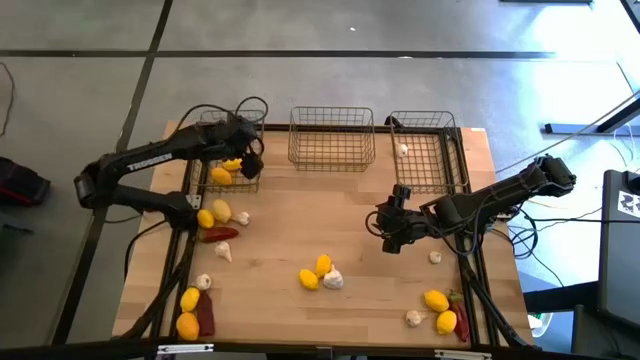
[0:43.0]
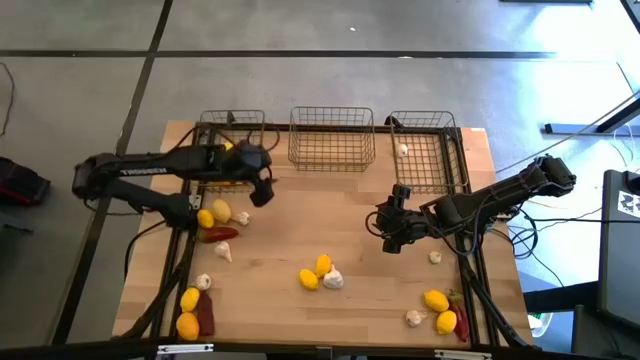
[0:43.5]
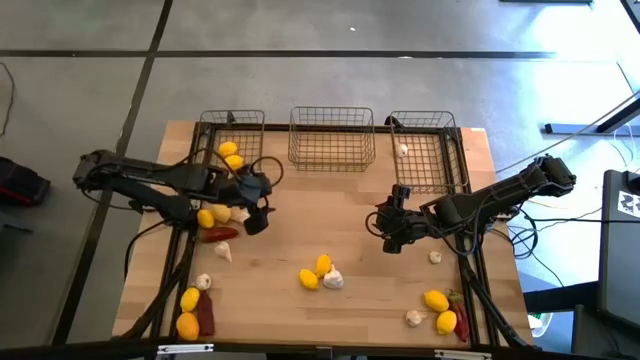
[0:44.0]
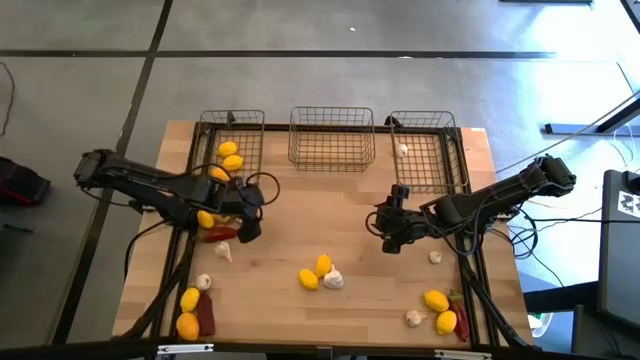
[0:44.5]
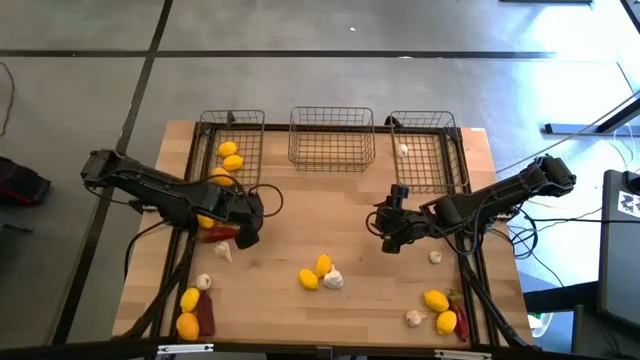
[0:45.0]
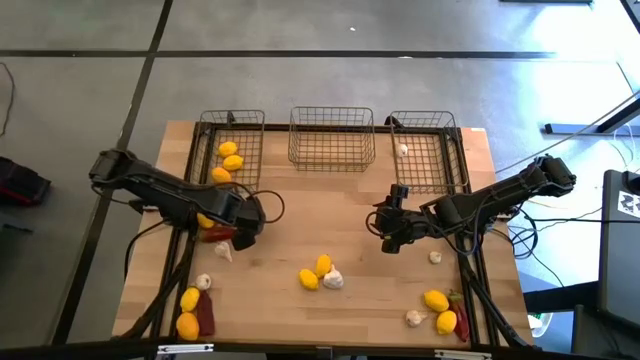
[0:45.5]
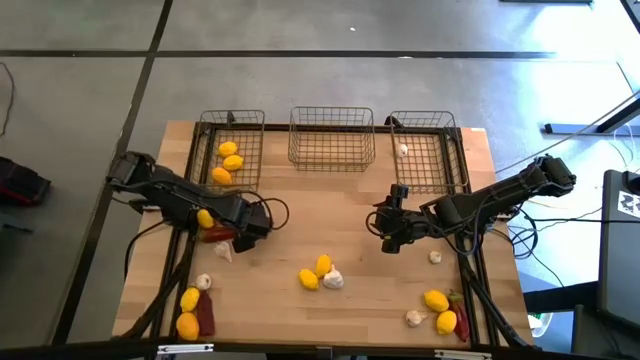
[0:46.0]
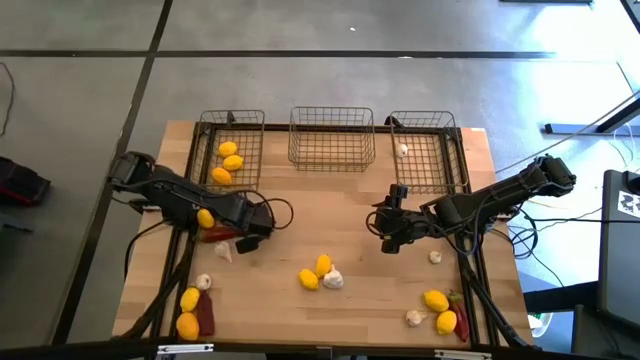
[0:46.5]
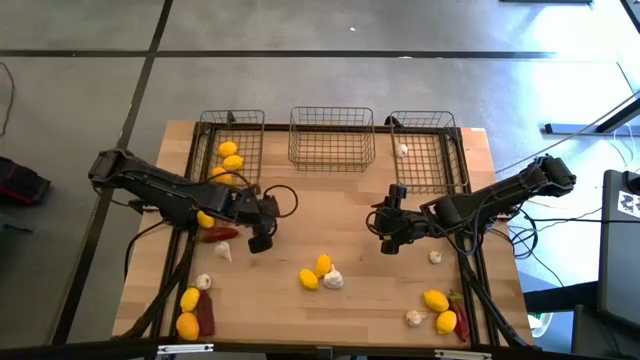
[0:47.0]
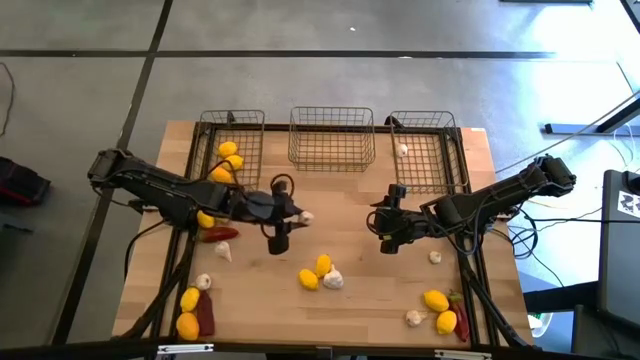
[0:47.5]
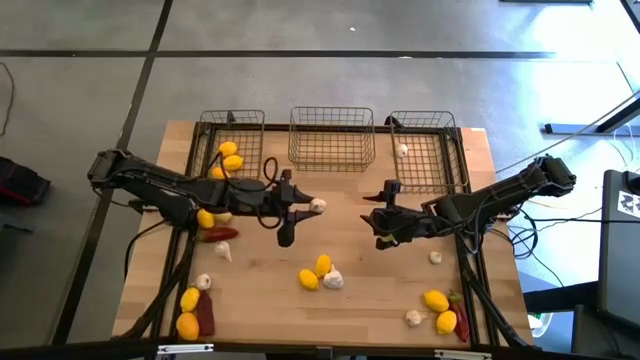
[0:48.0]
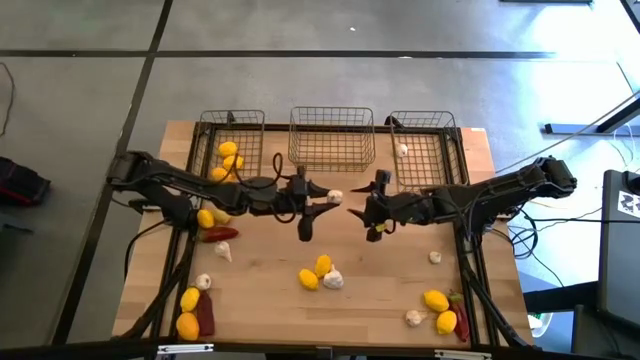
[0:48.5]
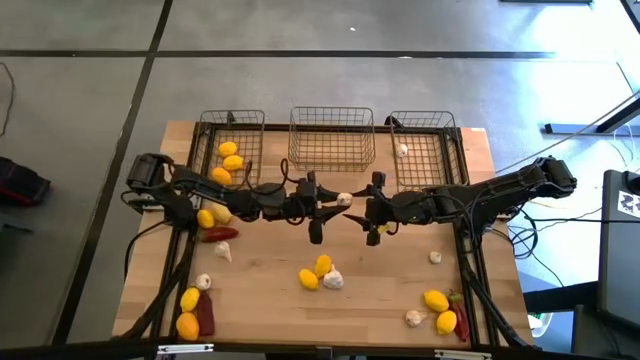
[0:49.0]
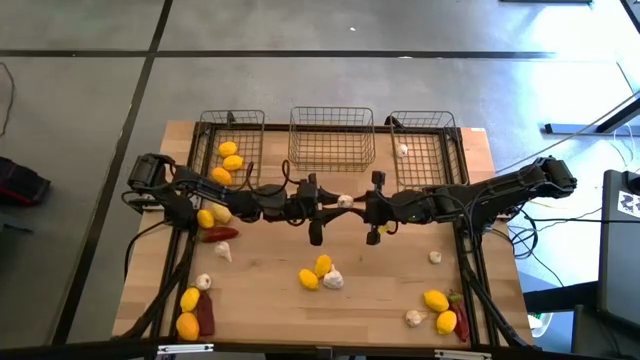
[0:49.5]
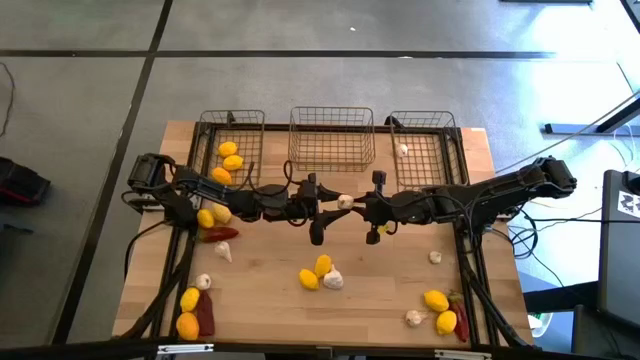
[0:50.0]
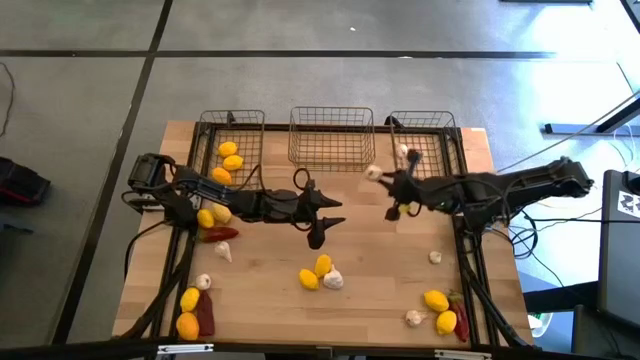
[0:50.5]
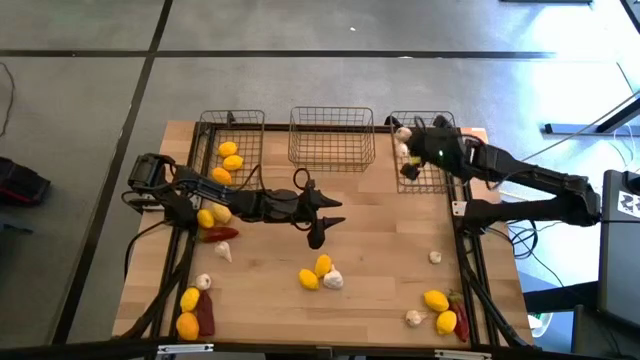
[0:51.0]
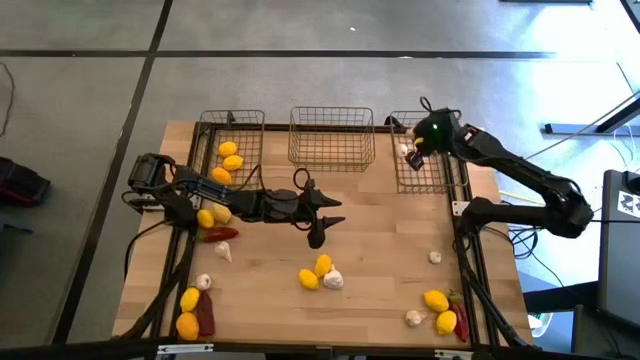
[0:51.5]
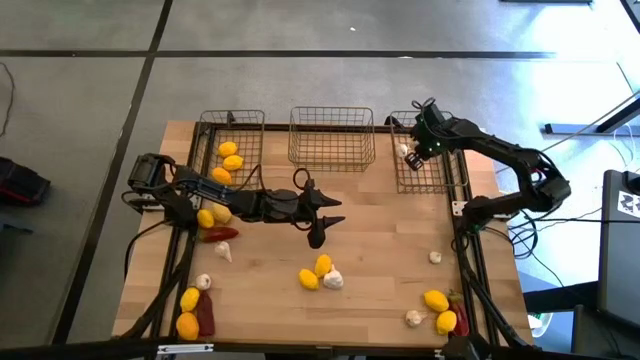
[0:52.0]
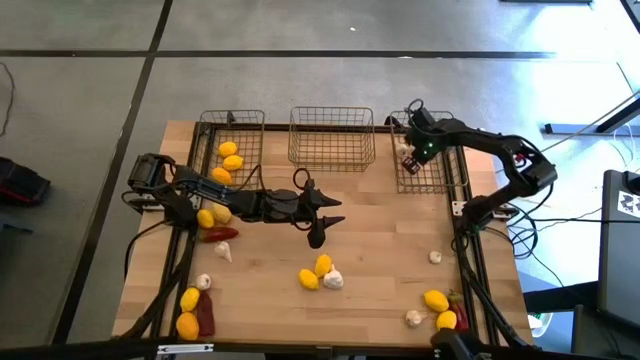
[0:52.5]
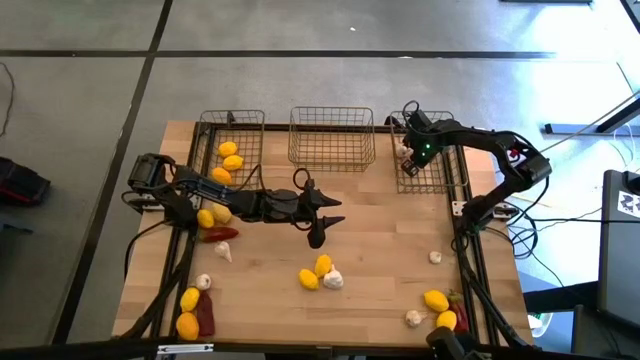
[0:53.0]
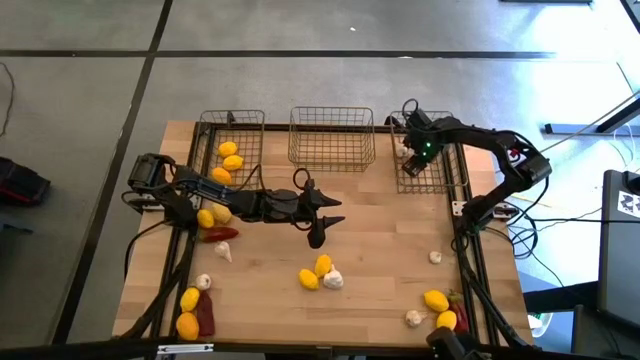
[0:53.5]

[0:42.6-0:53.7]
Task: Sort produce into baskets
Put the white garlic into the right gold wire basket

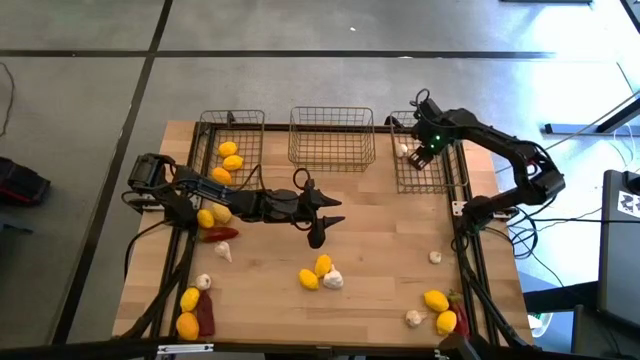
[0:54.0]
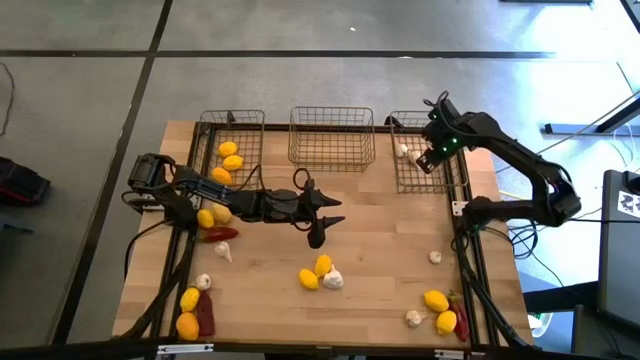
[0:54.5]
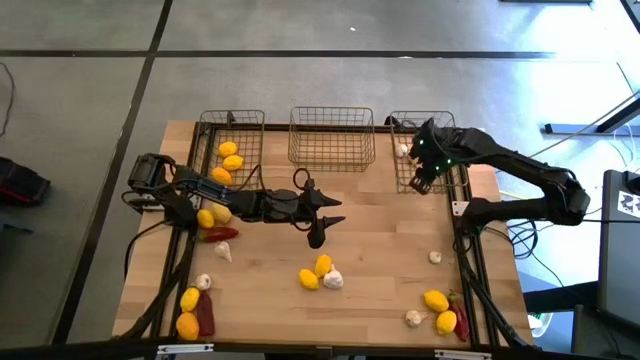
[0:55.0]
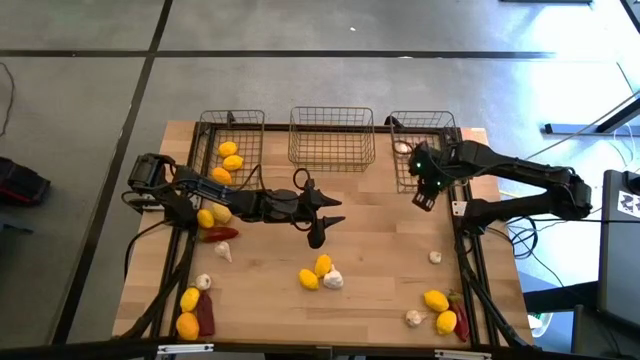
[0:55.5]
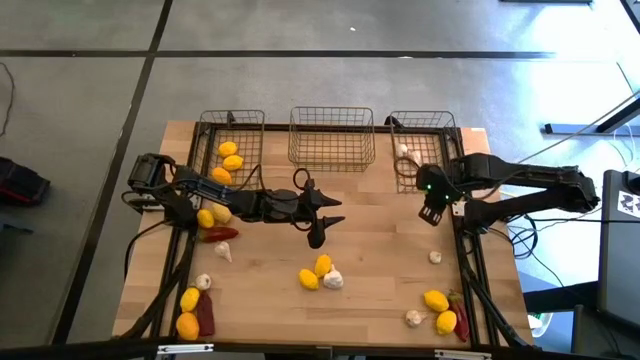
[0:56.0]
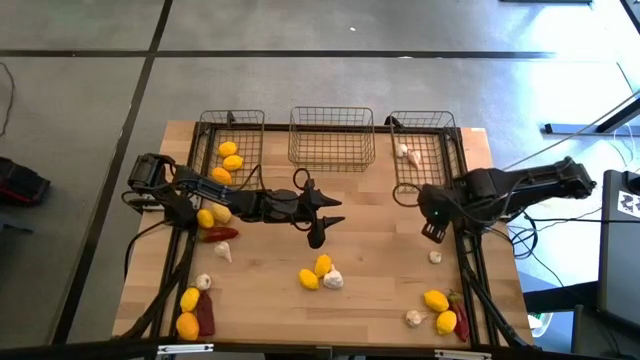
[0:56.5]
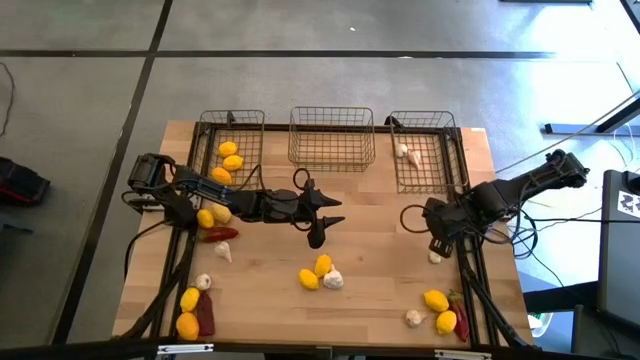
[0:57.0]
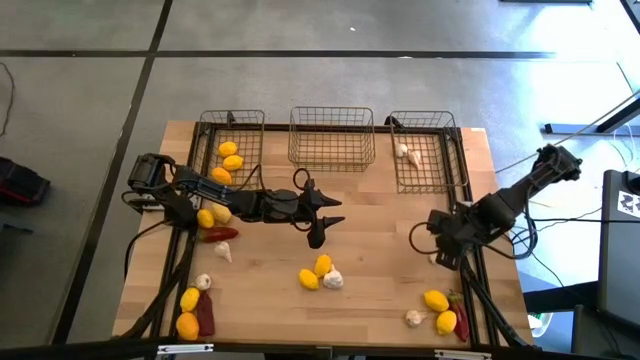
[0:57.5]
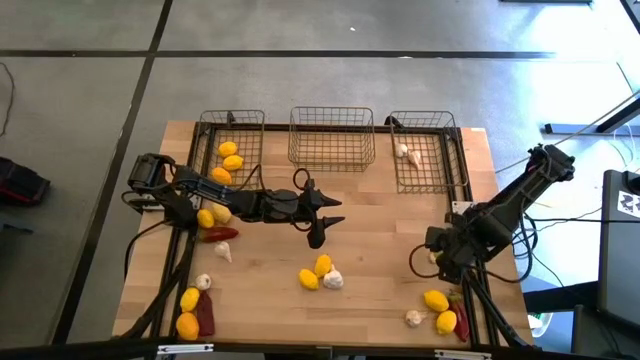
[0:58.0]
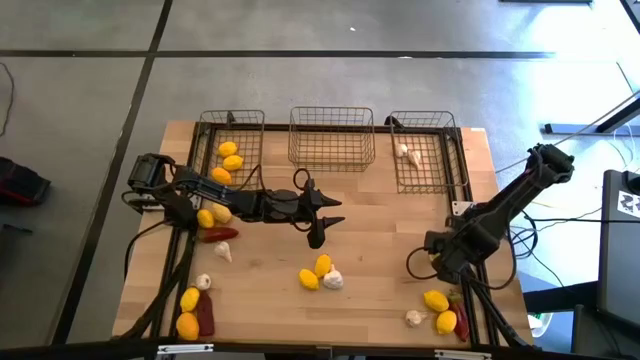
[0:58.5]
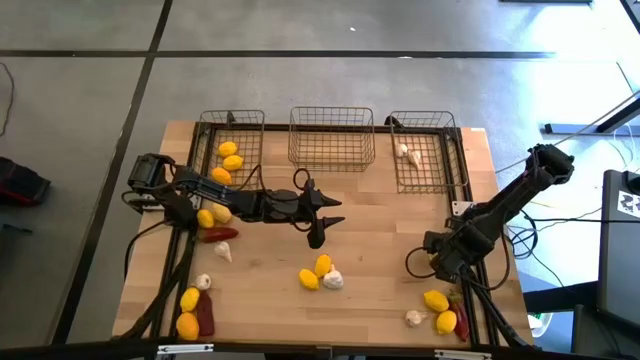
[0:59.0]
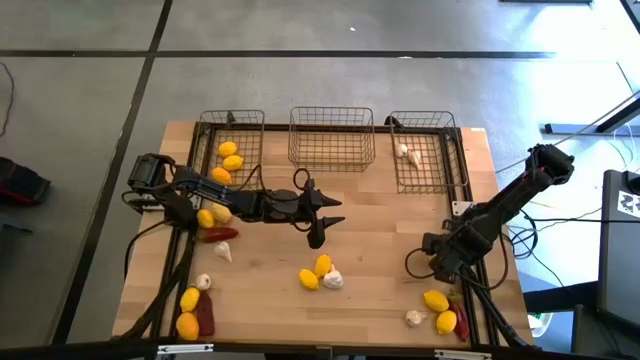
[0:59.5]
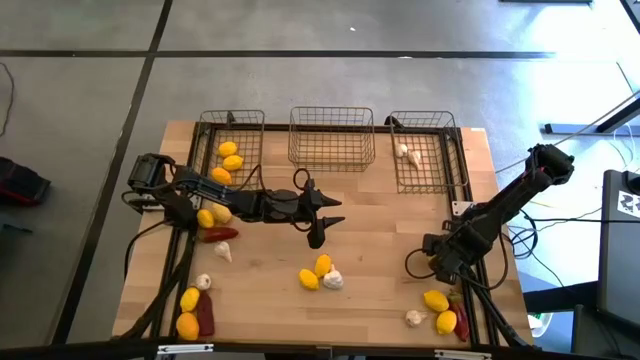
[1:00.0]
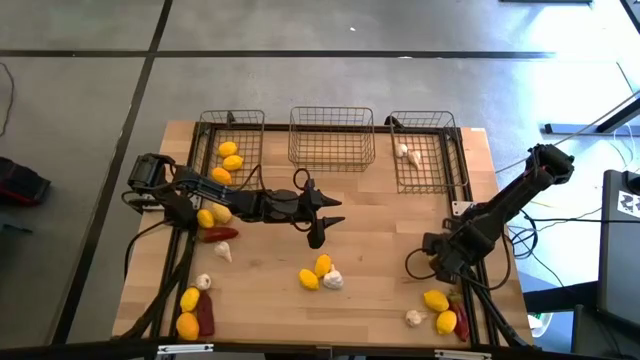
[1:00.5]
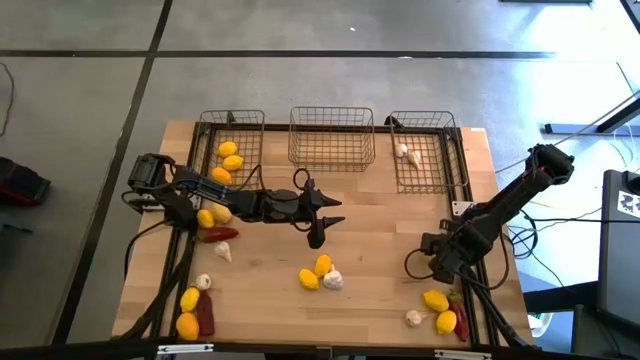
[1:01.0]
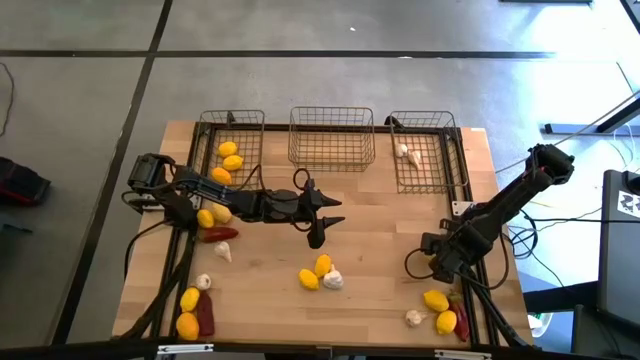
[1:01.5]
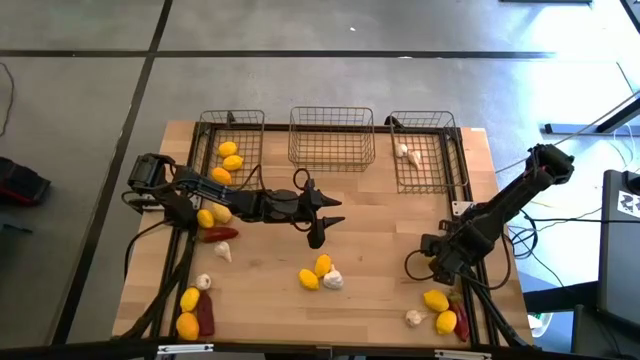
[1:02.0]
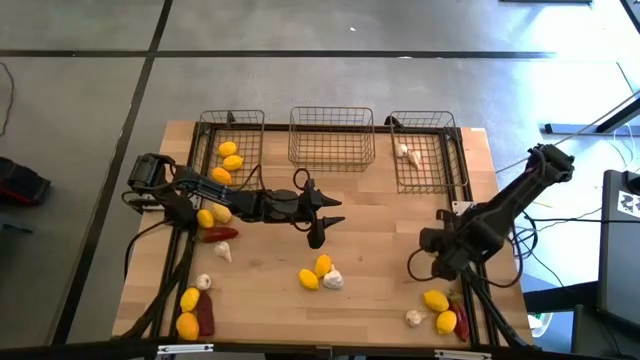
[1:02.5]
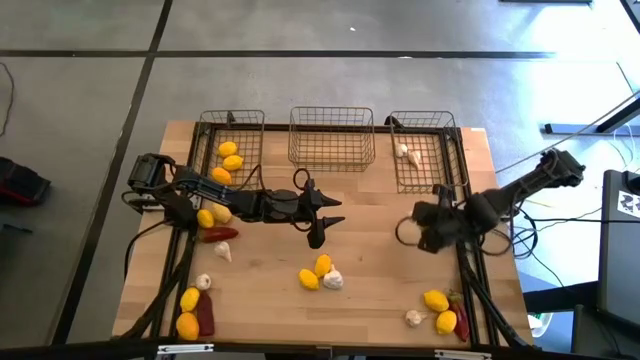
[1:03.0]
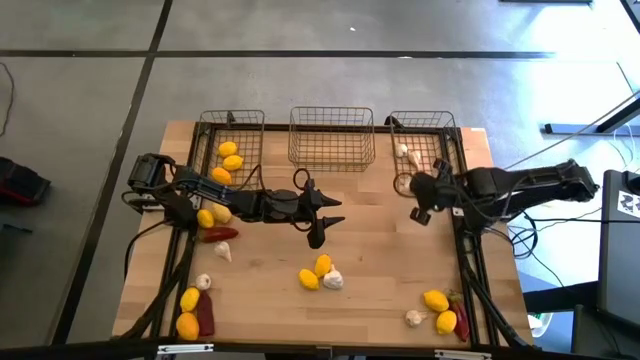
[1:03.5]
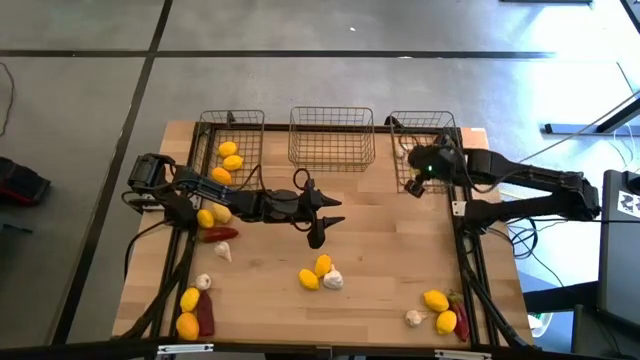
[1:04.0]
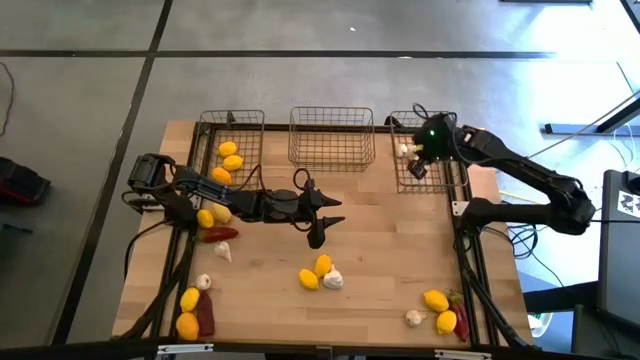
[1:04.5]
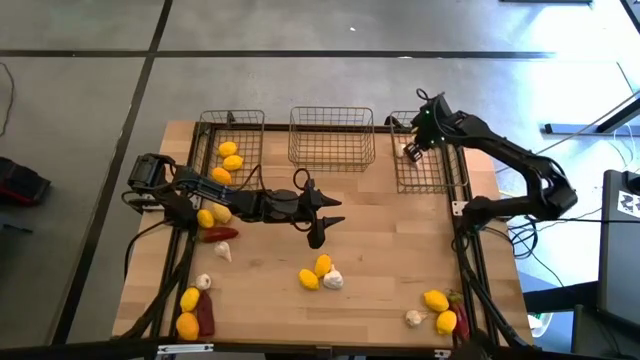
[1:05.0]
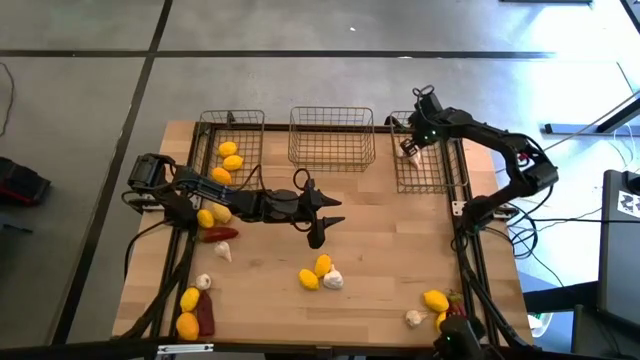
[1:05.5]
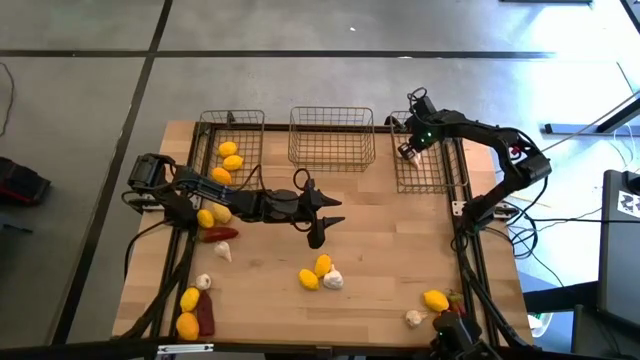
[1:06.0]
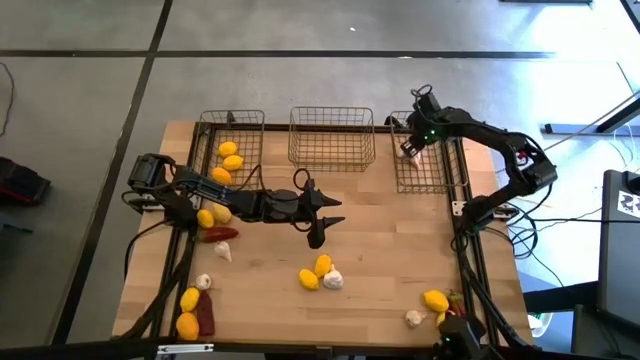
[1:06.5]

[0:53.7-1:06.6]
Put the white garlic into the right gold wire basket
